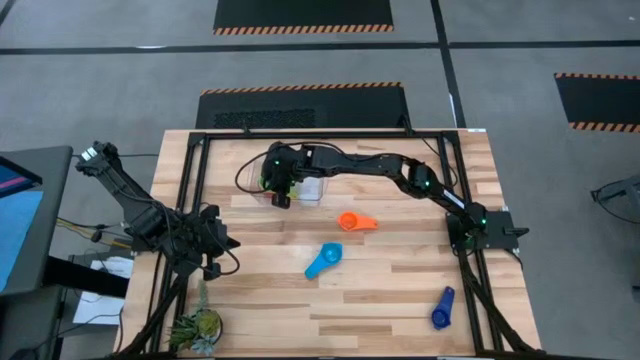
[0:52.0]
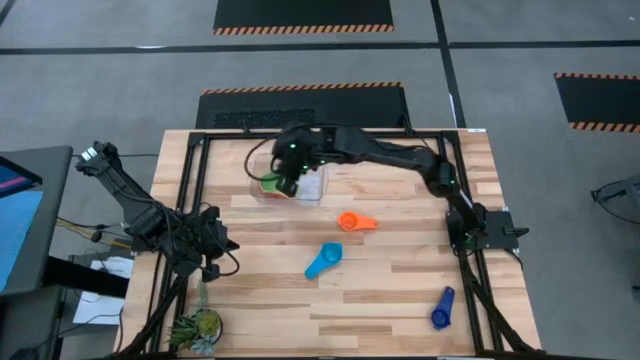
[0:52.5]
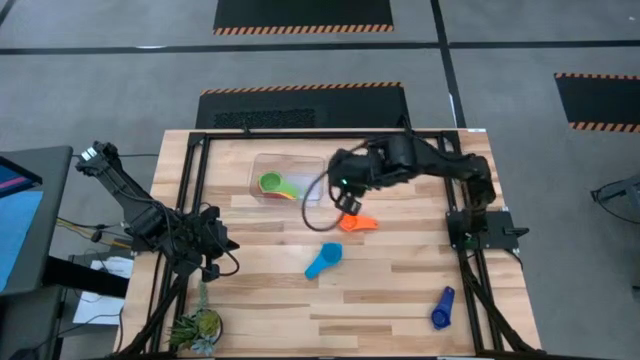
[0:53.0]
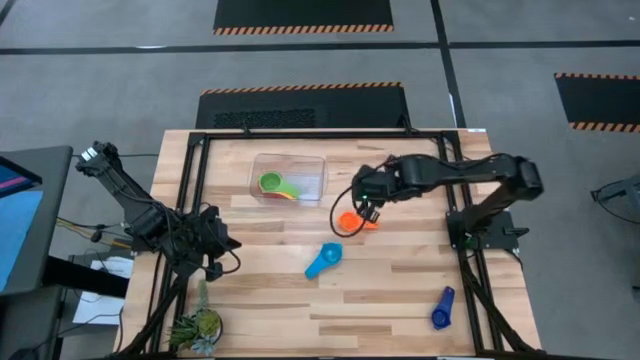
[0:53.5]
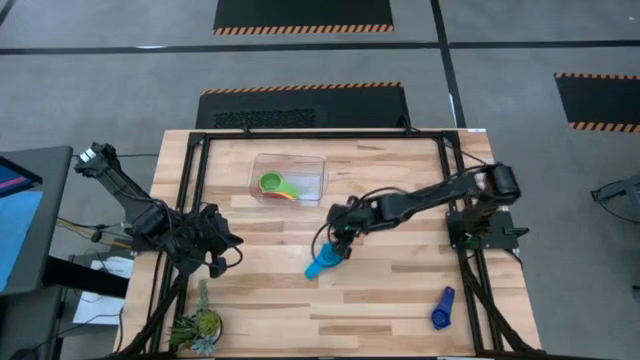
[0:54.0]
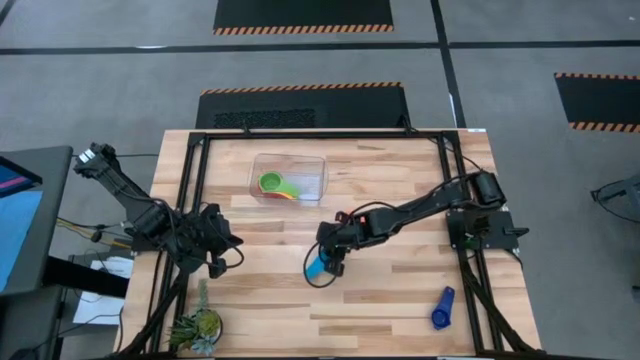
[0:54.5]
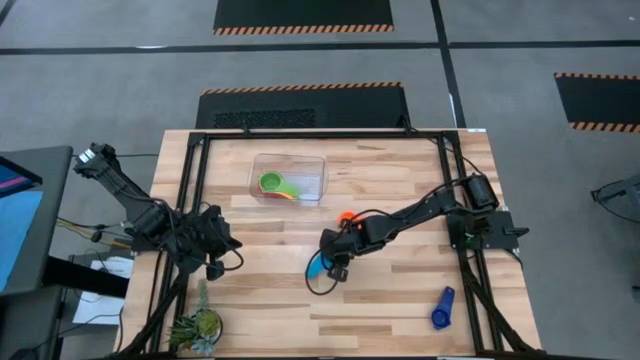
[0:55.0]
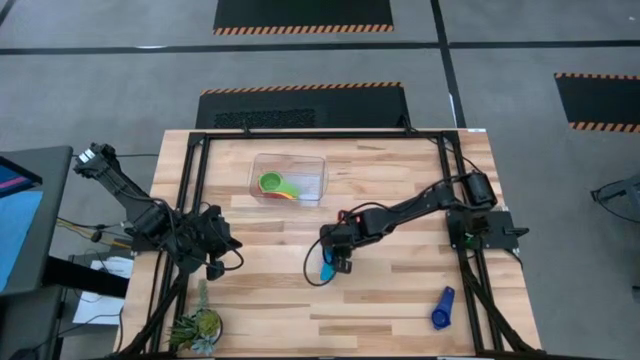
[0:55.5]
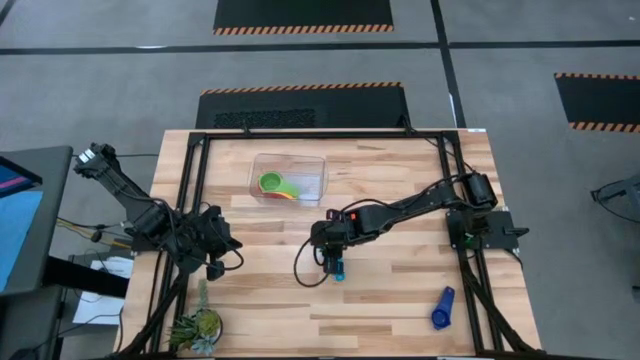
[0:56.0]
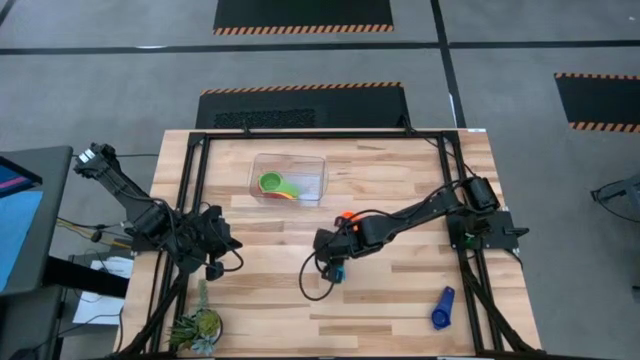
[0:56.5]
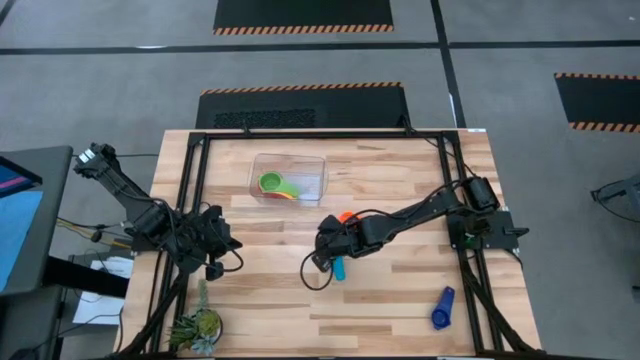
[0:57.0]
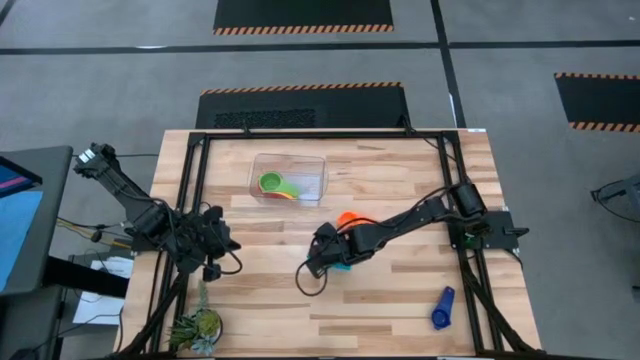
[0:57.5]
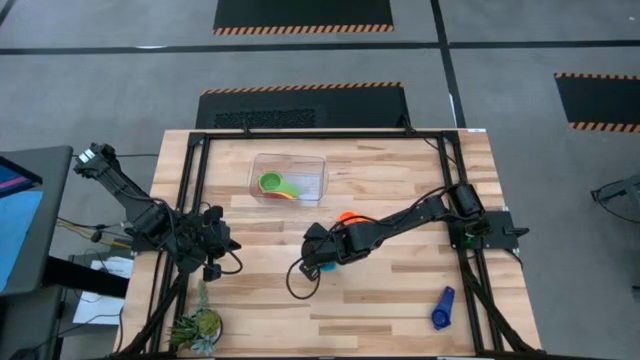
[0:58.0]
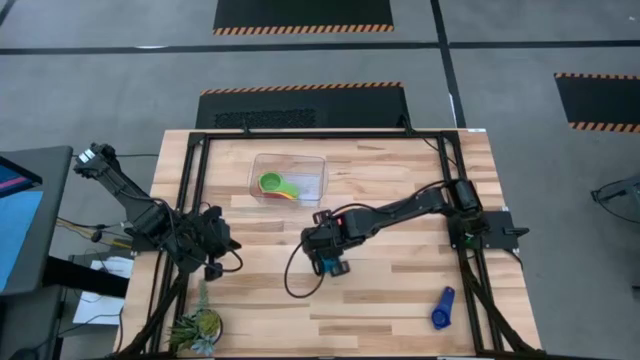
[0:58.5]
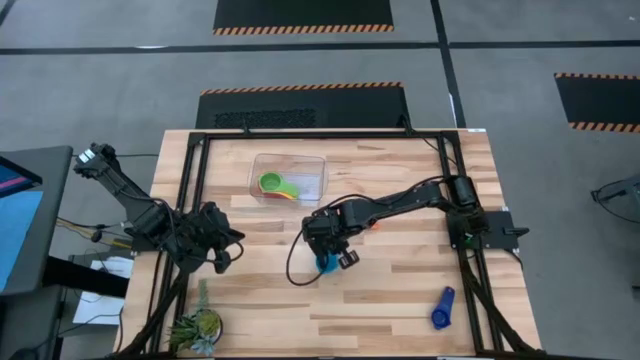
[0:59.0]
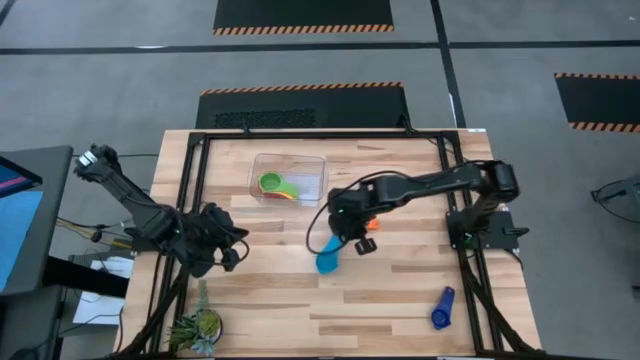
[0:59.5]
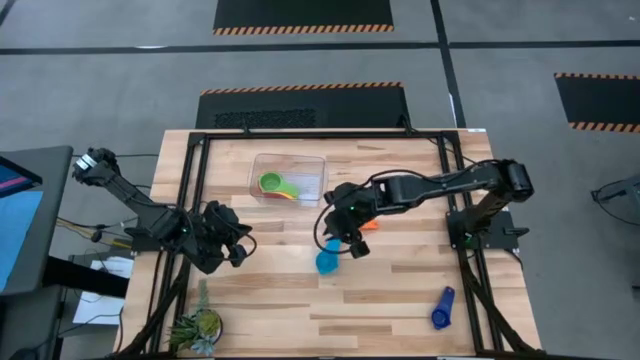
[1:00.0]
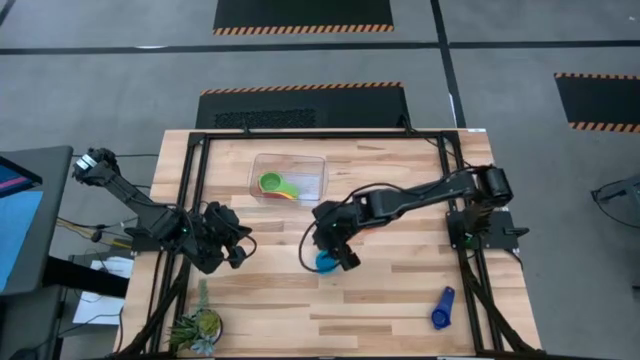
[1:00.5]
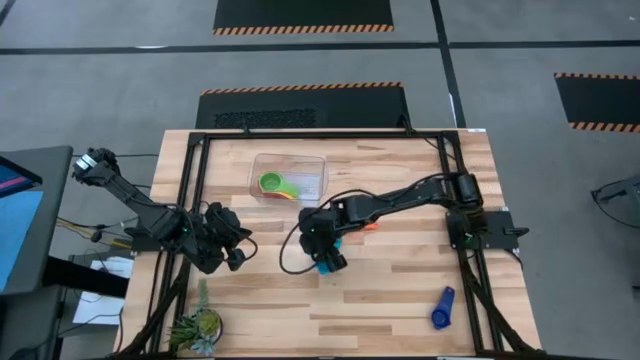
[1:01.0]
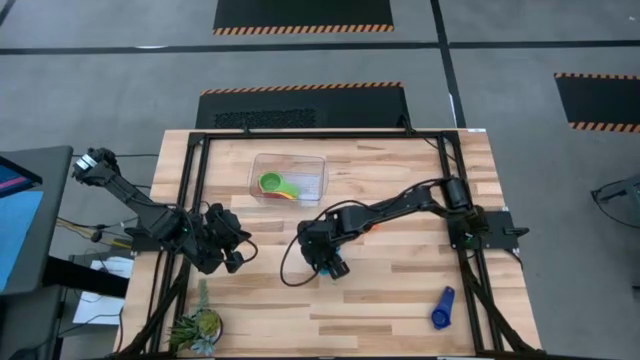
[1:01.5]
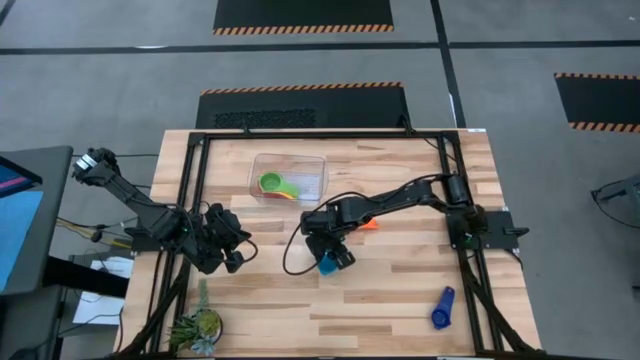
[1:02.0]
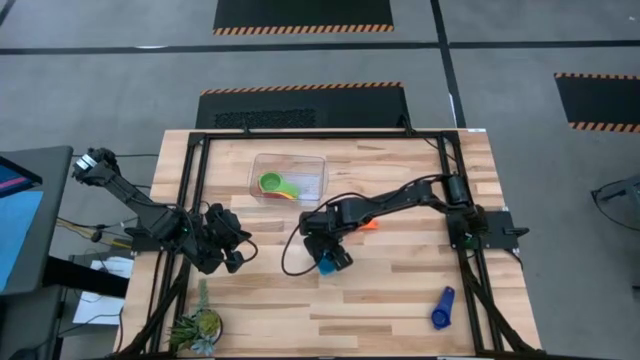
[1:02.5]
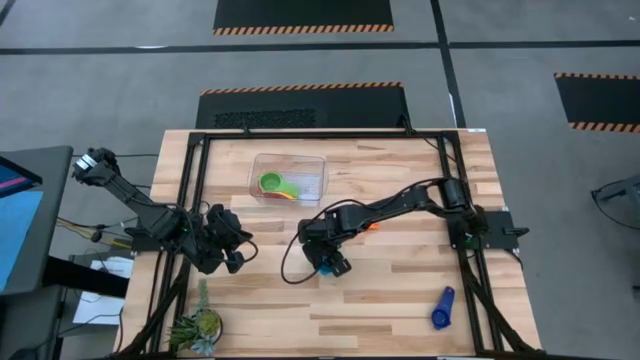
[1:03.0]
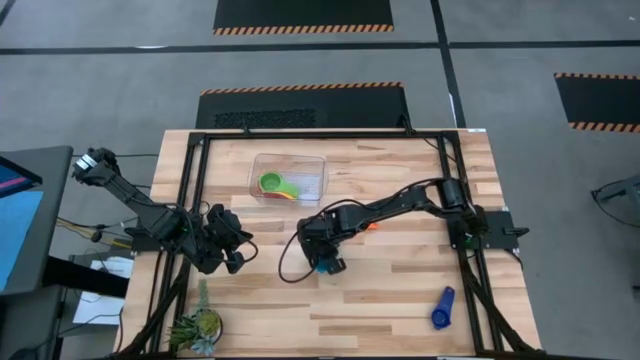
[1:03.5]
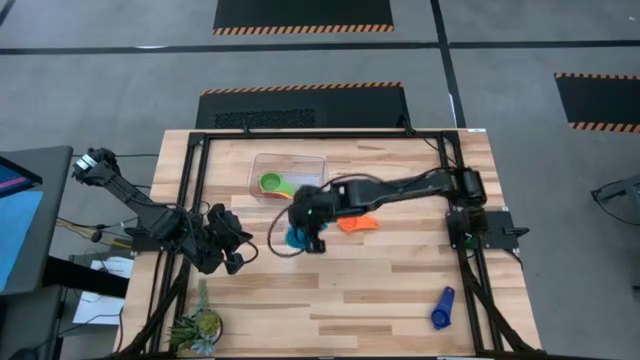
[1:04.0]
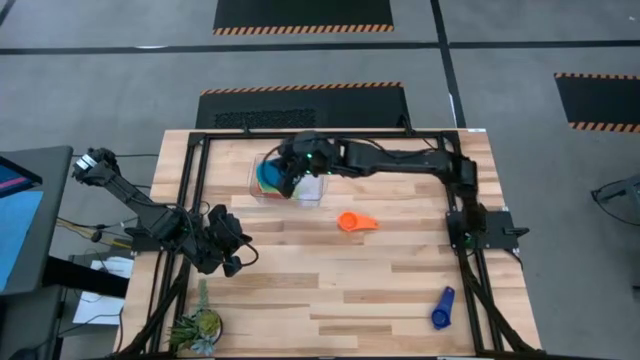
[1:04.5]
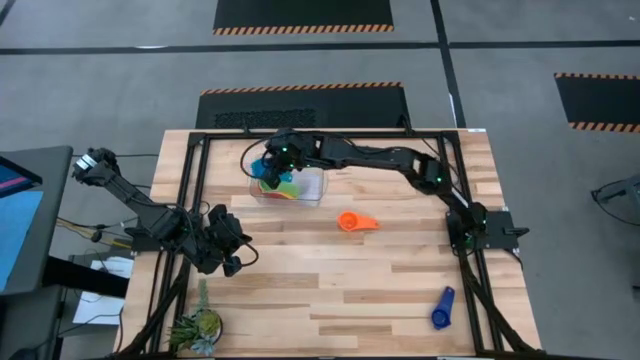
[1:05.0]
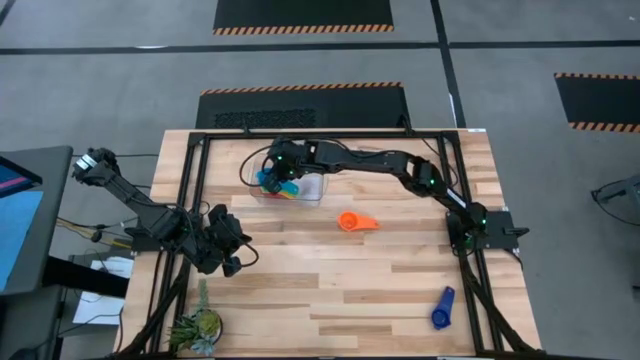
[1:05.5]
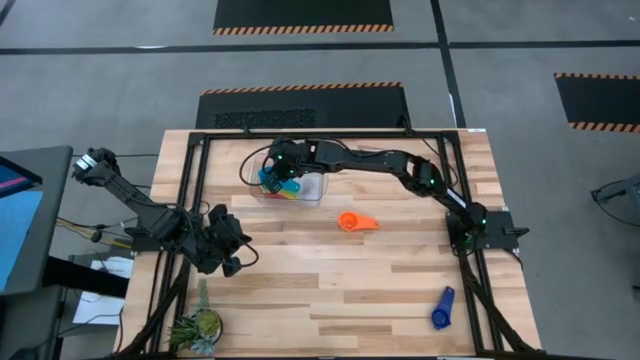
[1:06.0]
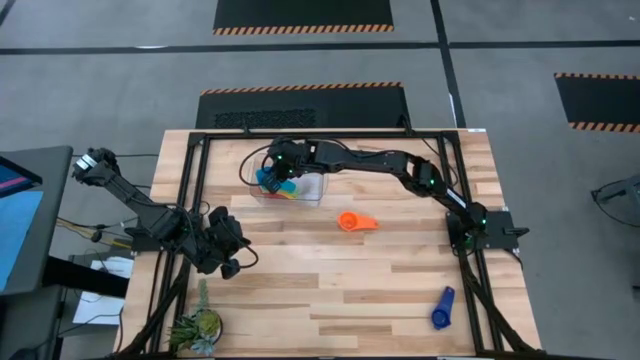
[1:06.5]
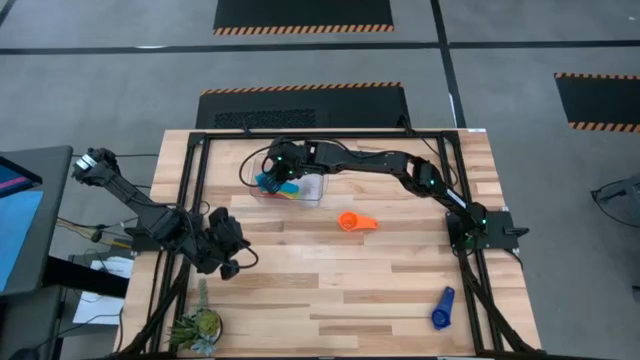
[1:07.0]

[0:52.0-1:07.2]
Task: Nest measuring cups in basket
Stack the light blue measuring cup on top of the green measuring cup in the transparent bin

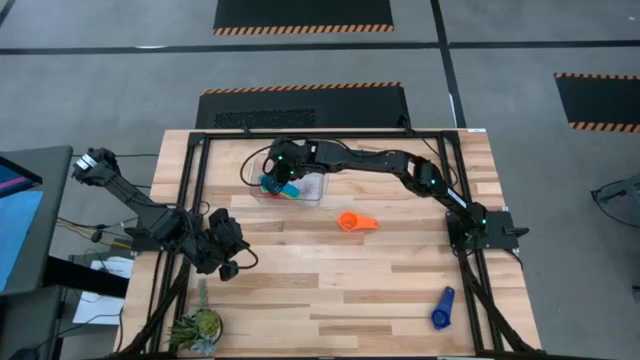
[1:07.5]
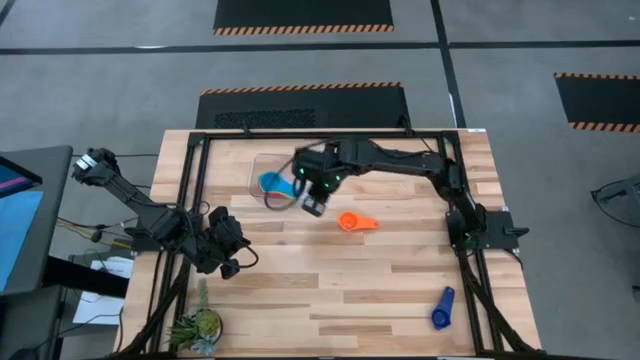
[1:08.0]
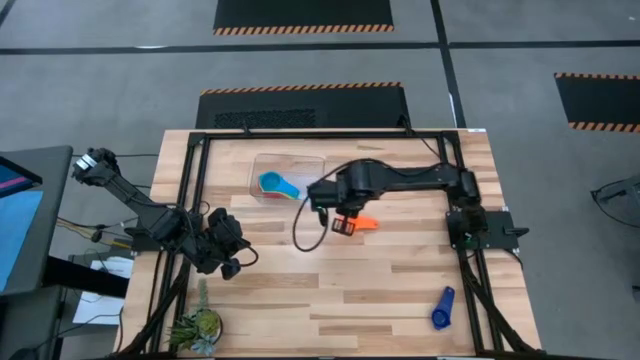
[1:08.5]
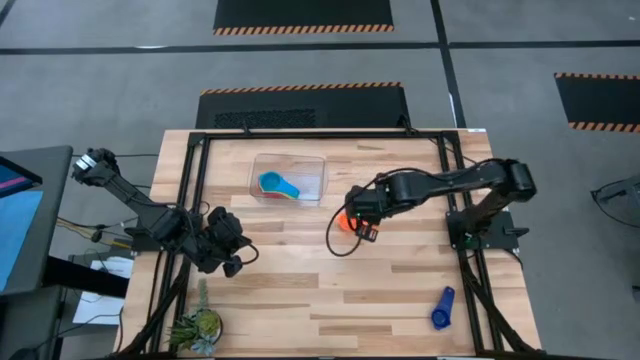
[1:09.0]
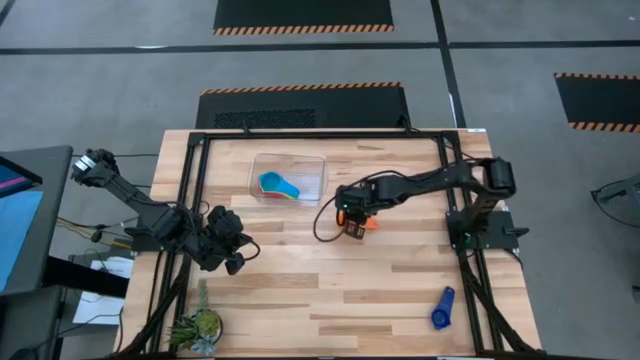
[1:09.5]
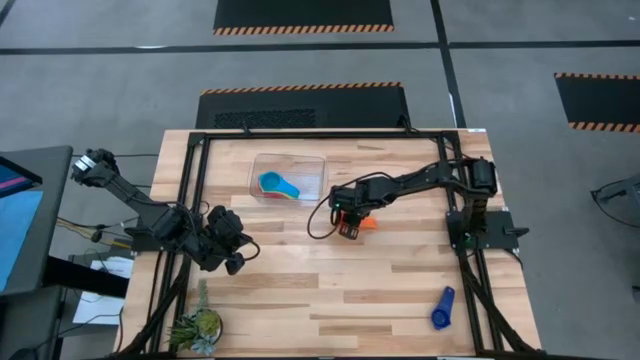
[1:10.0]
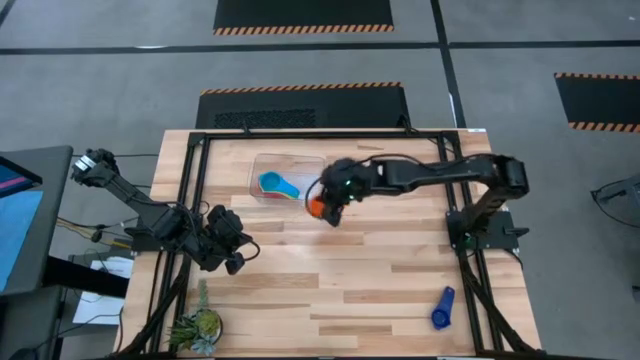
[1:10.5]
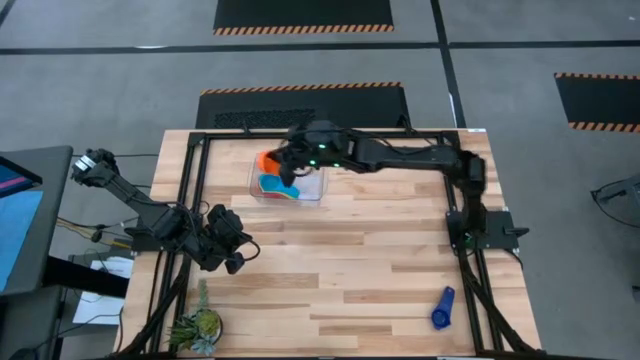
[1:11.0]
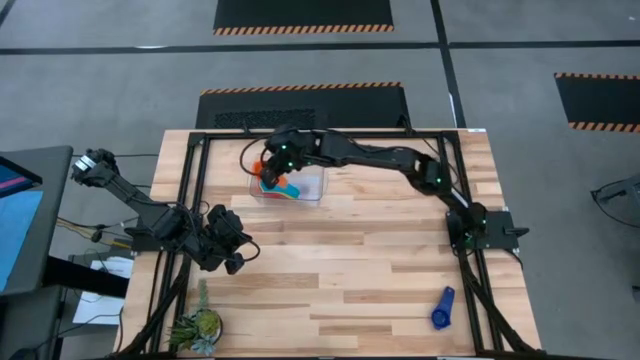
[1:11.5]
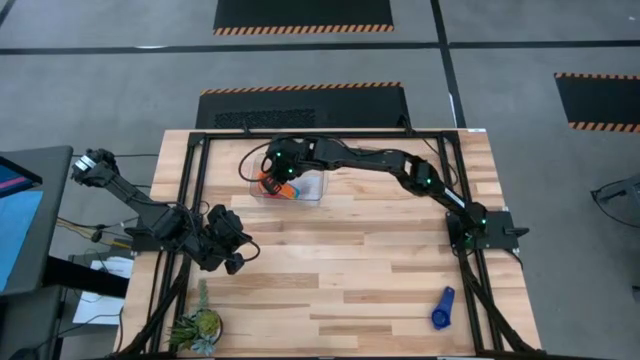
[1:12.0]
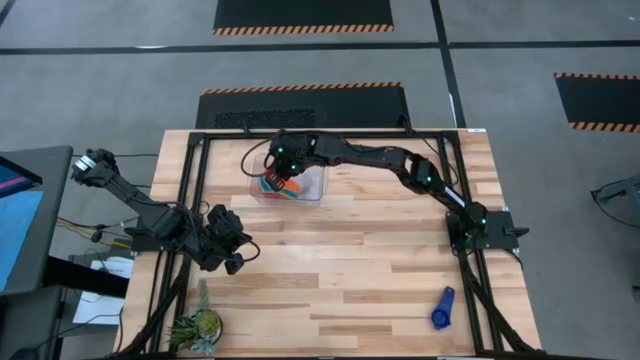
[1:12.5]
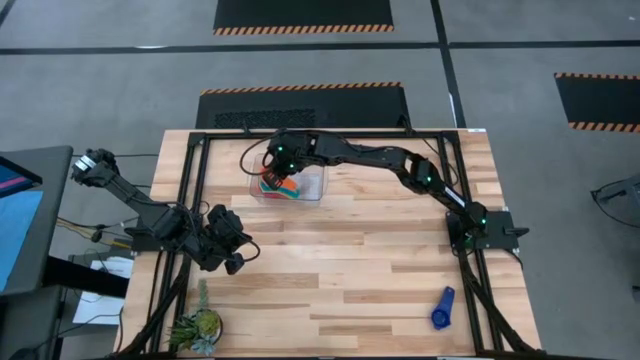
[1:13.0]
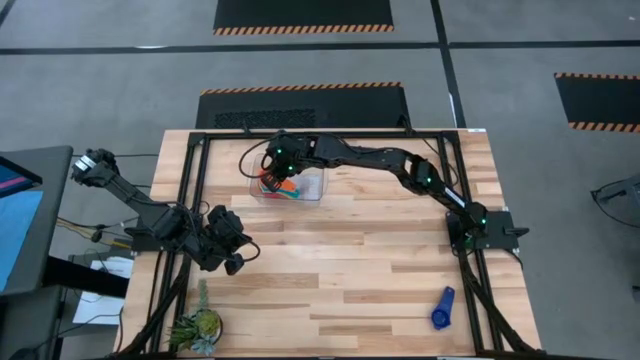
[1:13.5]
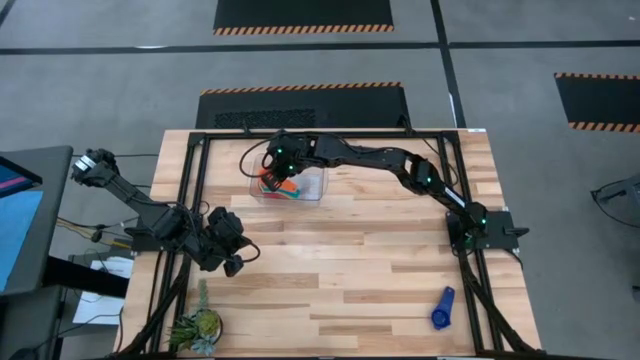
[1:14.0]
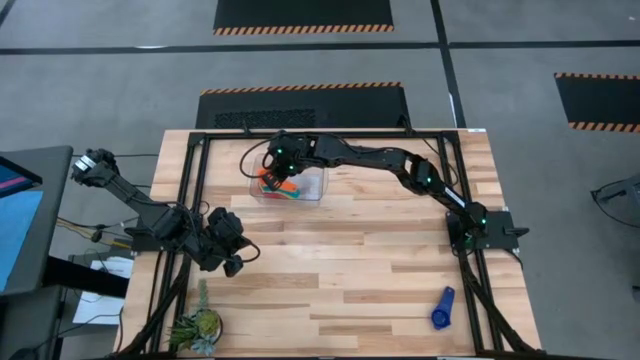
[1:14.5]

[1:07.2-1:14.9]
Stack the orange measuring cup on top of the light blue measuring cup in the transparent bin
